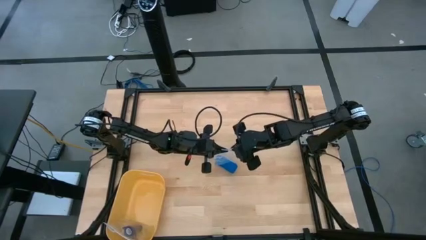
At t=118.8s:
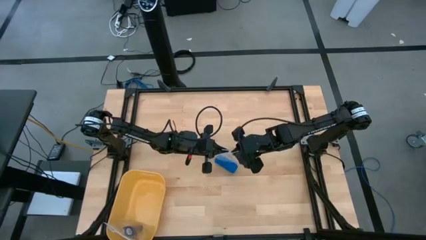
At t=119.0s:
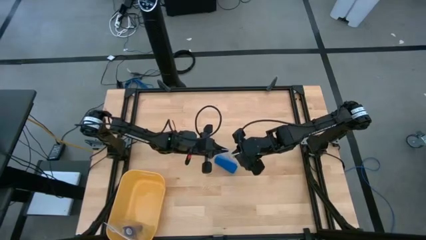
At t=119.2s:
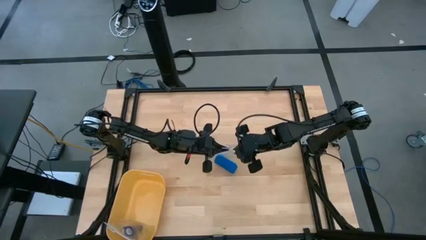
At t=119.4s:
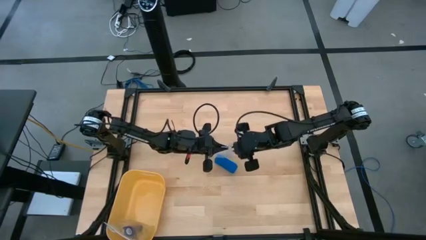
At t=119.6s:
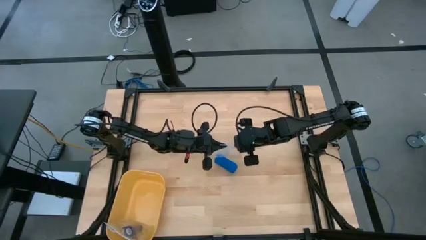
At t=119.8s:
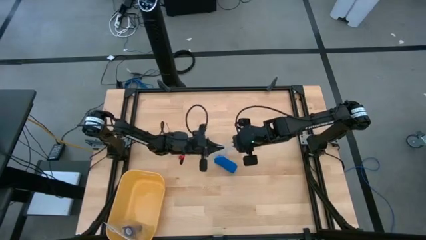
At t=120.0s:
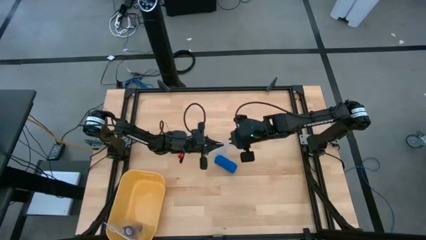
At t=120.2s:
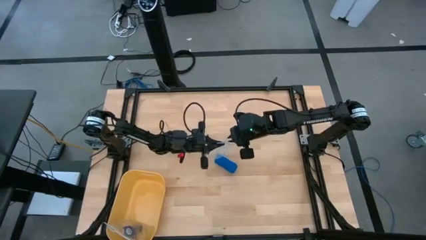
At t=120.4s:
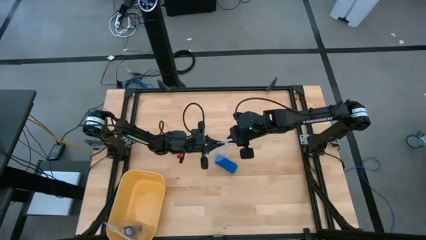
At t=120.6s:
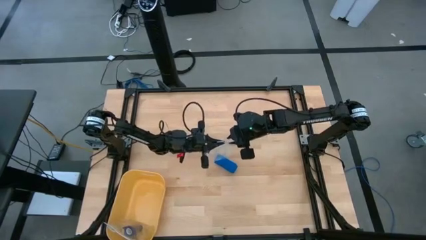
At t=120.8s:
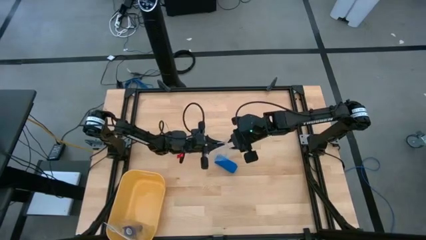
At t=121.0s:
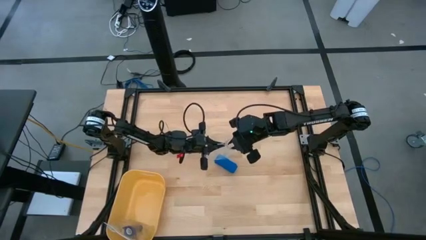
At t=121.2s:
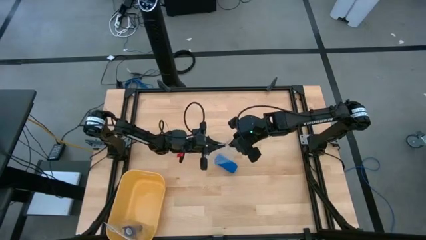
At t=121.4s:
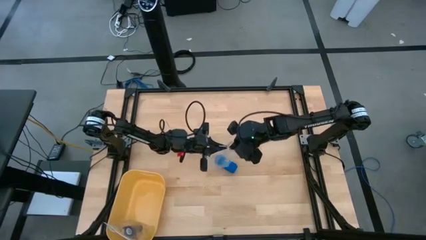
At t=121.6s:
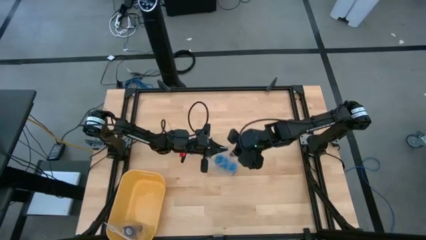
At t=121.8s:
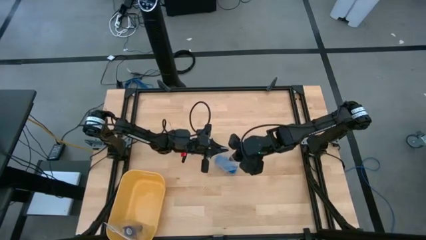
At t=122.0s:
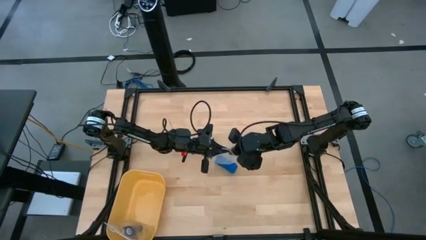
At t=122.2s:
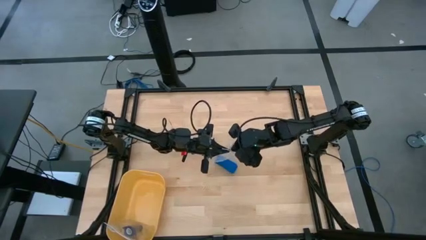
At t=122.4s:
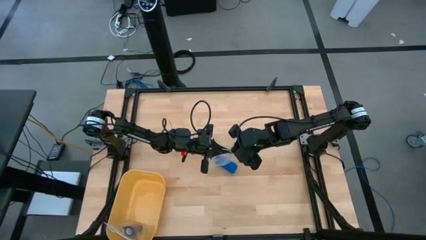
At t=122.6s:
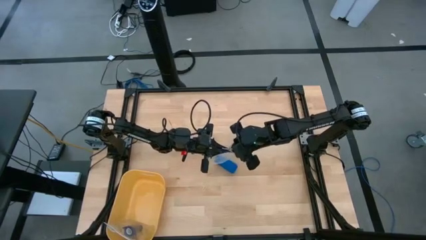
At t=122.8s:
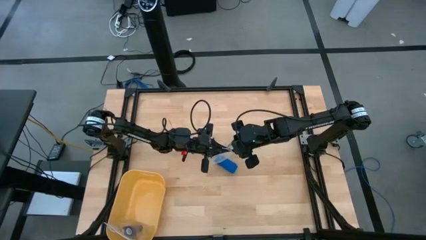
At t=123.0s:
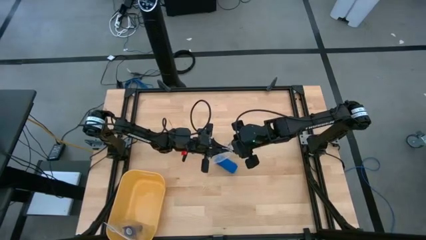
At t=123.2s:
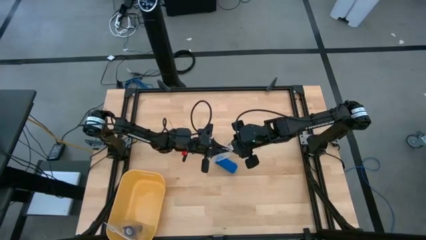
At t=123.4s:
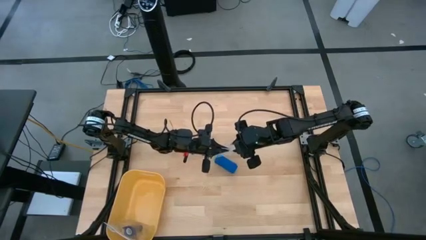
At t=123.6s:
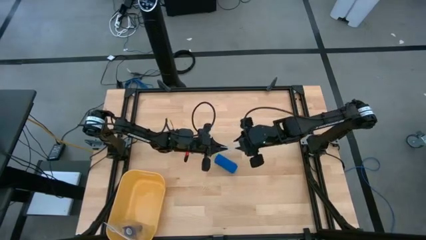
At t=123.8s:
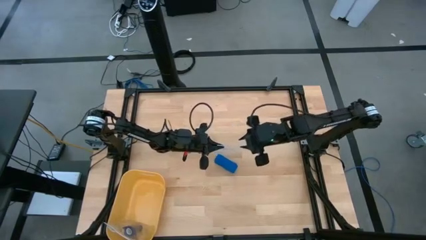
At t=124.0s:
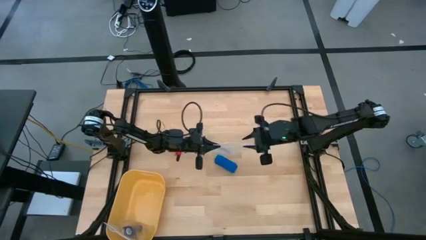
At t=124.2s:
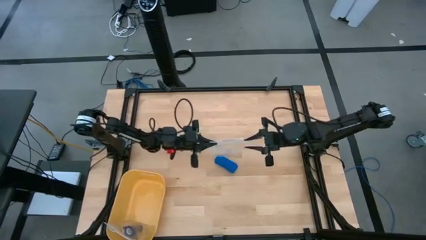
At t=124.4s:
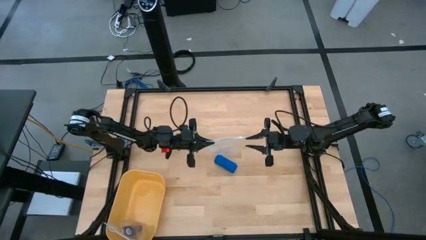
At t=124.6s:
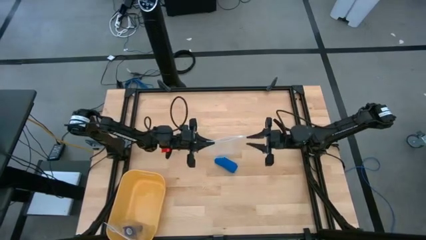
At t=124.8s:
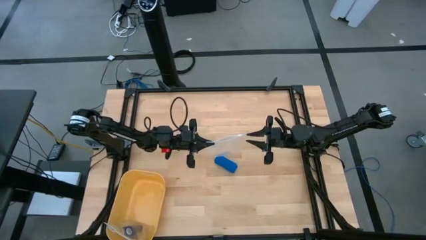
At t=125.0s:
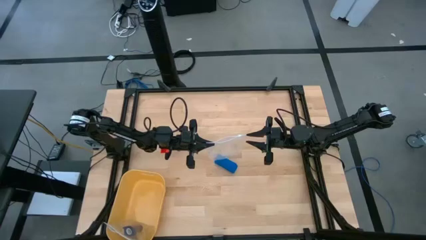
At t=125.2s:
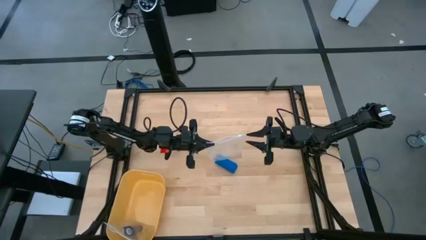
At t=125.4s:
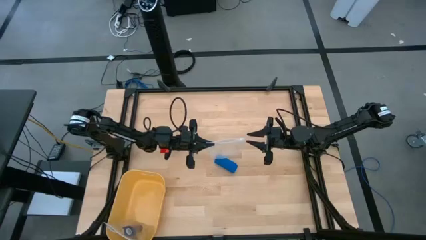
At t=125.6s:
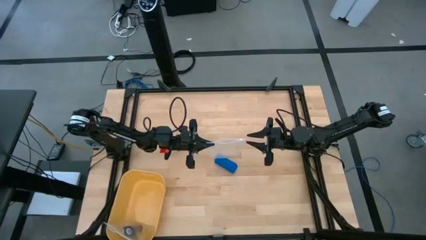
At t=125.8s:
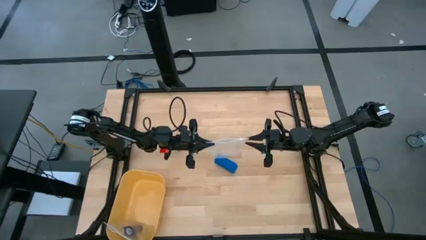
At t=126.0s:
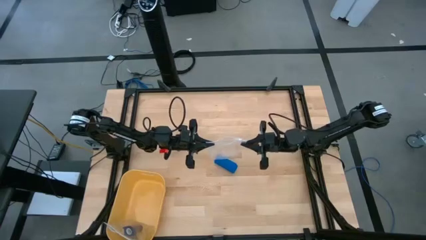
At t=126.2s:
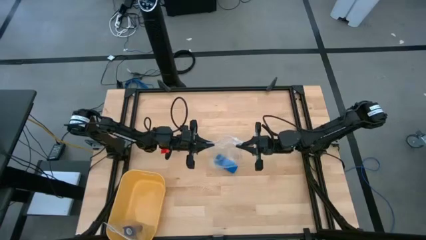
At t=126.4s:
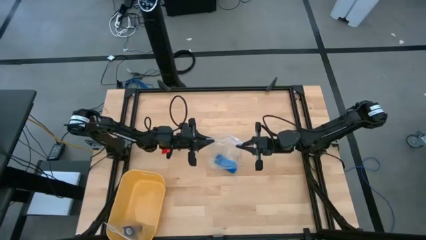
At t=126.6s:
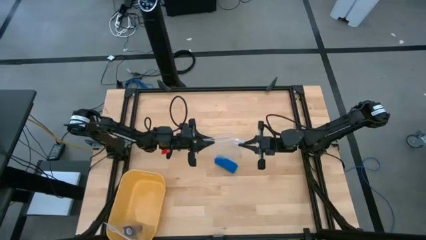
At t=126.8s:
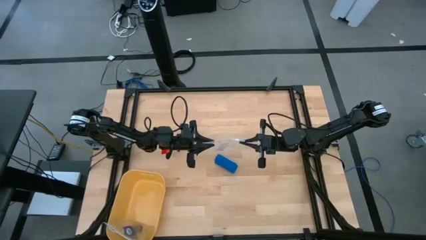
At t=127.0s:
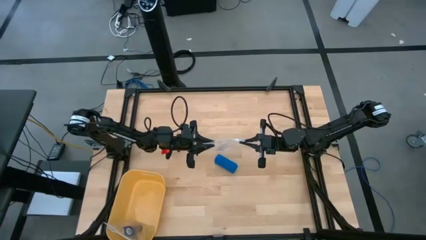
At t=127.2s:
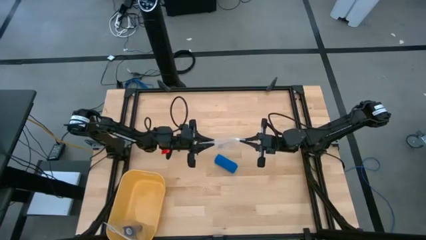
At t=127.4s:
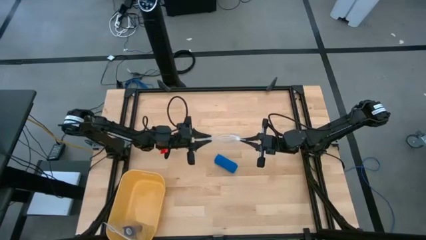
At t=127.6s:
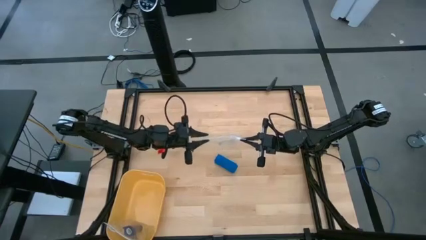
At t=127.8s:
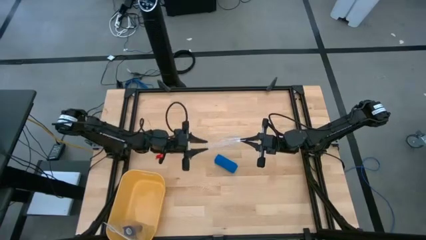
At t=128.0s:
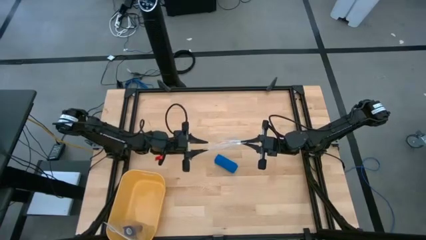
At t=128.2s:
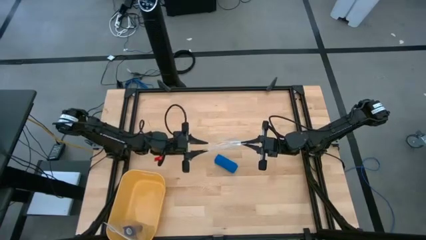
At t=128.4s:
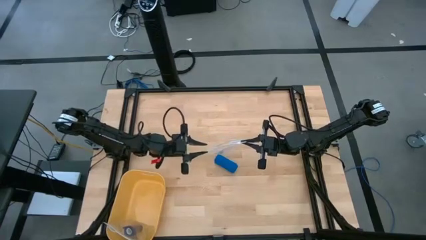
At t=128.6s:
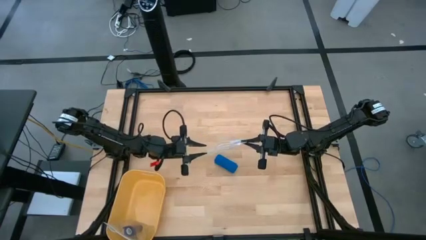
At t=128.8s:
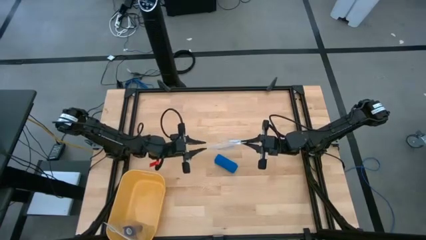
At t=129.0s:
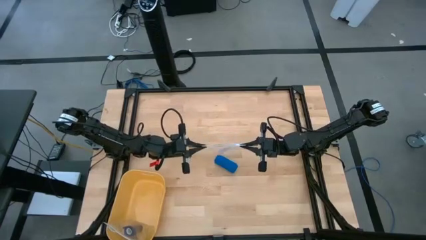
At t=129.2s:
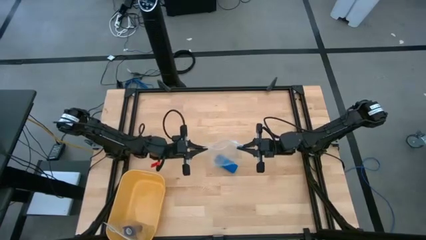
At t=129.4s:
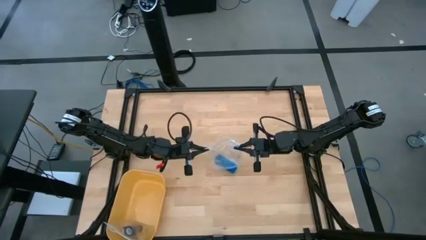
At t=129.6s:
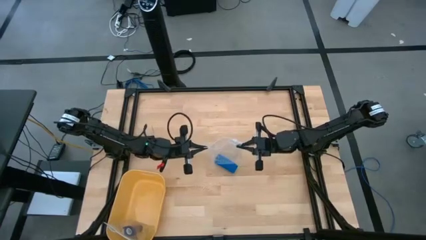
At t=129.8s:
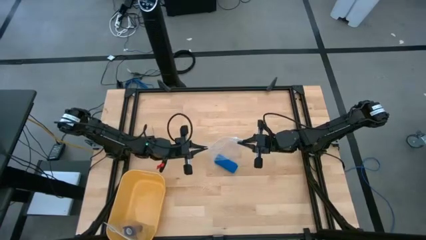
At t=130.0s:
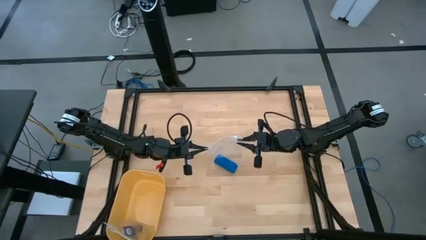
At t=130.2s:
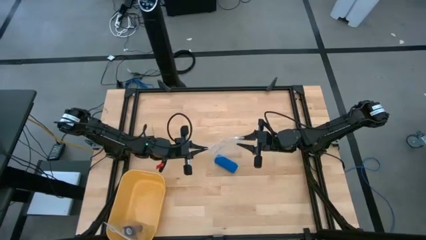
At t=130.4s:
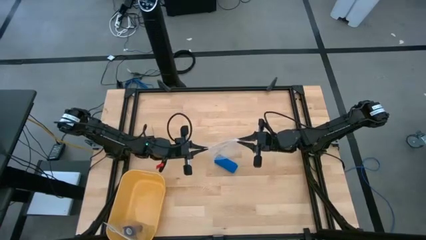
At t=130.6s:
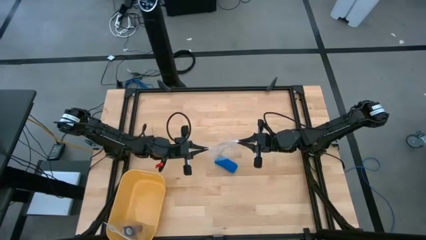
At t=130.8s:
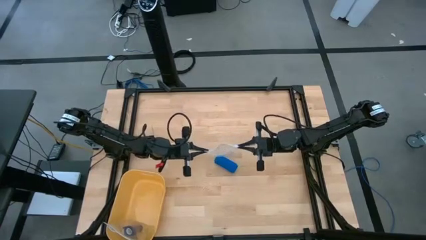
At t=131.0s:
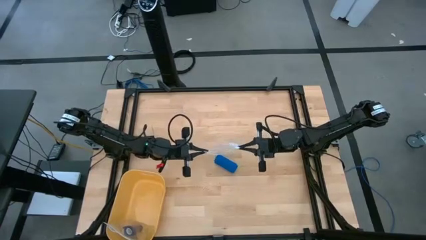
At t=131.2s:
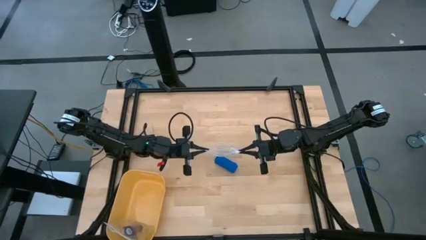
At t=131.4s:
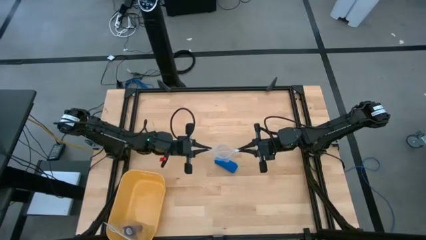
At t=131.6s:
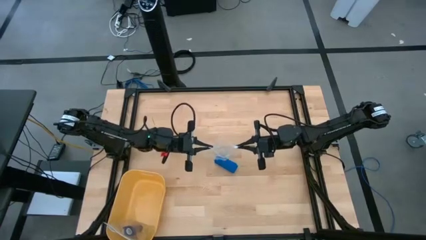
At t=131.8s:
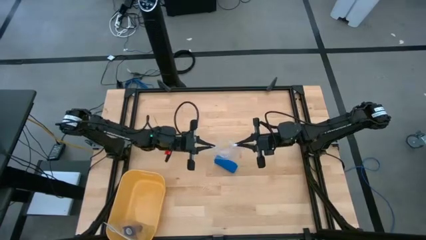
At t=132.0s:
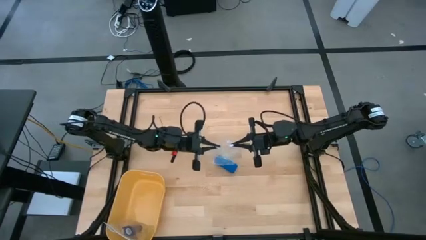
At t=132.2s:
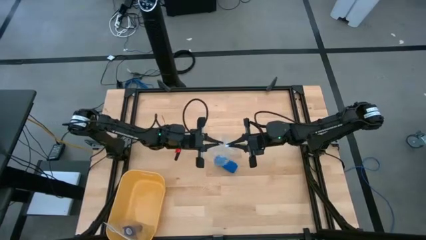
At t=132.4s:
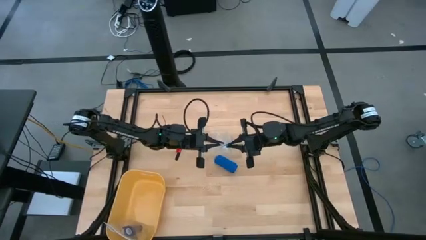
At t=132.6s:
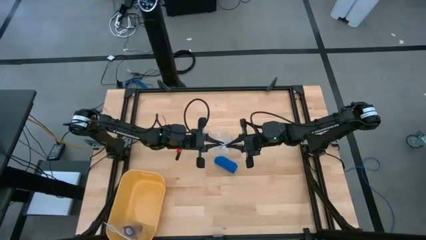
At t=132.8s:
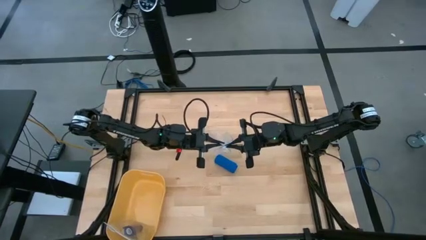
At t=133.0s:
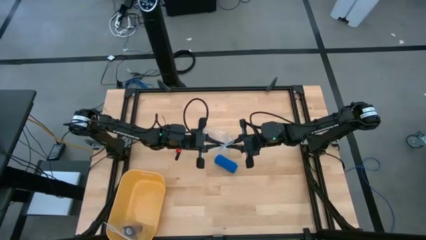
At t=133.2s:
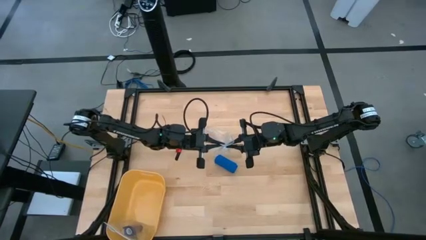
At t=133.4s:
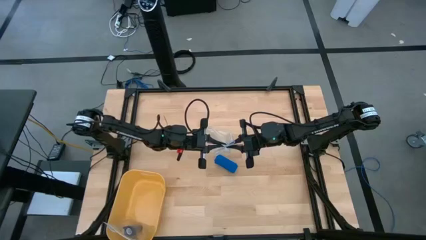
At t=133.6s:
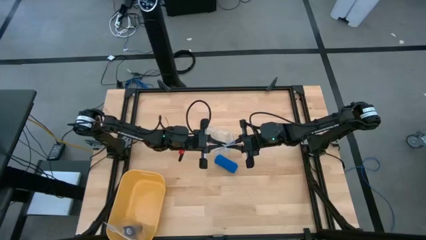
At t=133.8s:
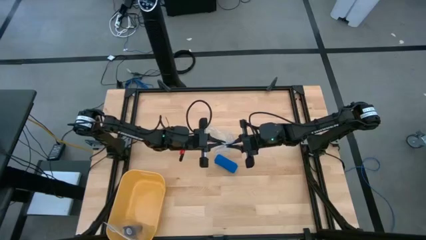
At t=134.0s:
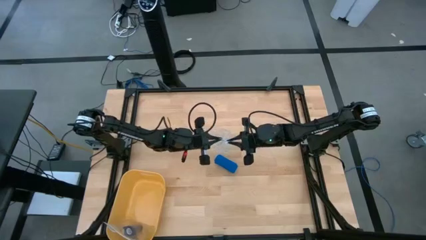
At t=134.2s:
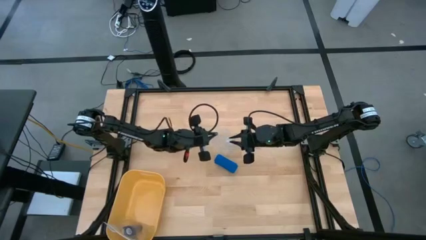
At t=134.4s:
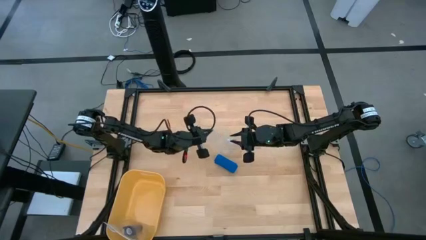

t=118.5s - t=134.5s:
Task: Roll bandage
Open the zip bag
